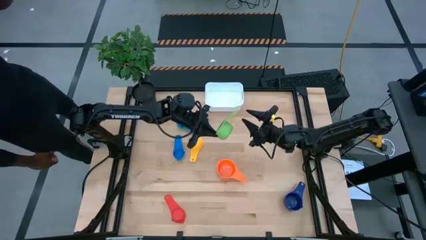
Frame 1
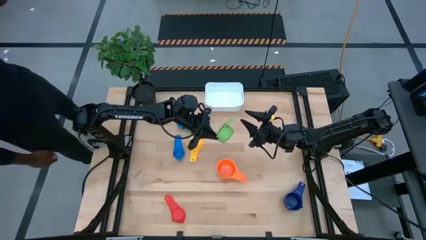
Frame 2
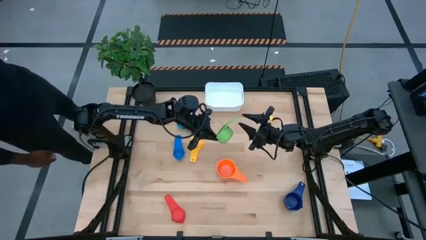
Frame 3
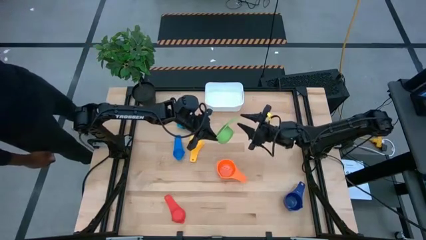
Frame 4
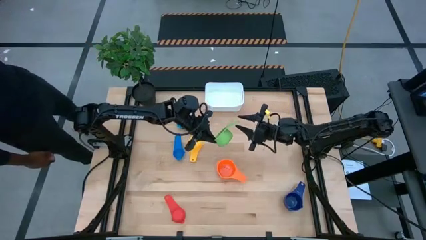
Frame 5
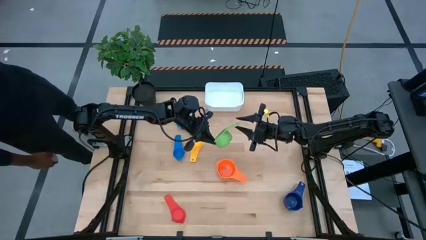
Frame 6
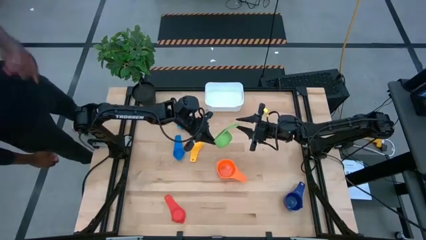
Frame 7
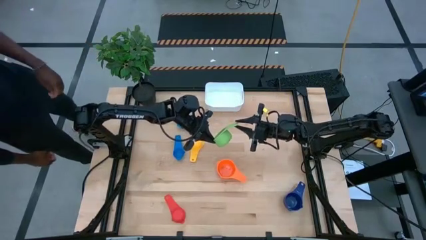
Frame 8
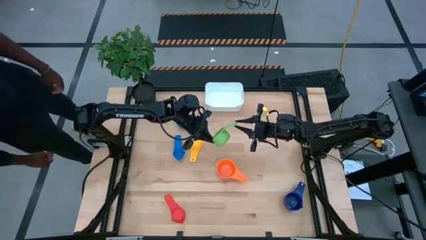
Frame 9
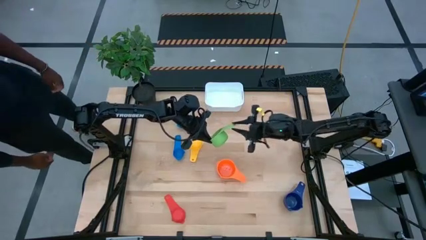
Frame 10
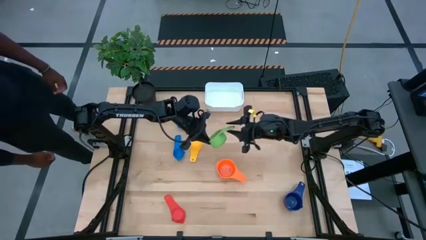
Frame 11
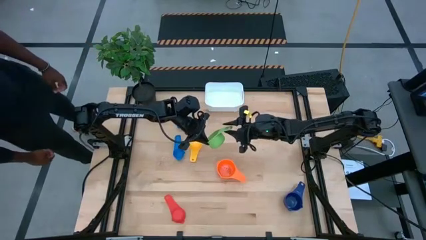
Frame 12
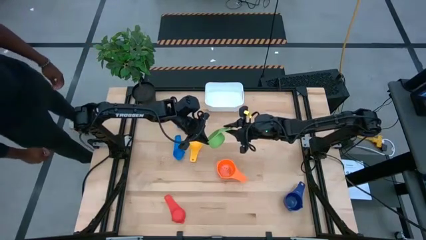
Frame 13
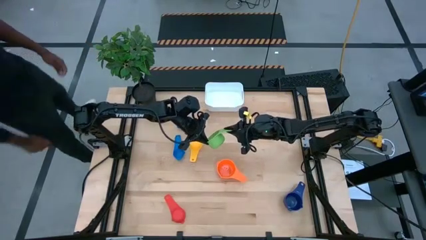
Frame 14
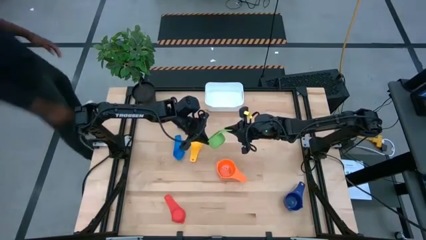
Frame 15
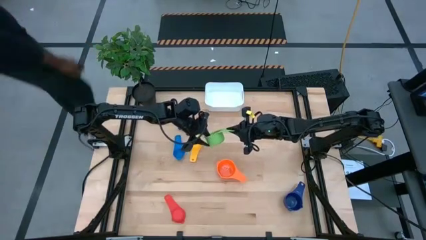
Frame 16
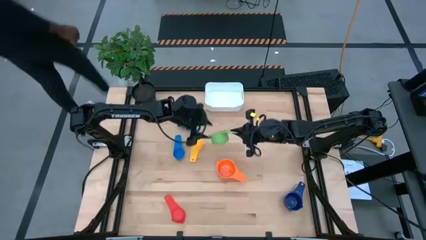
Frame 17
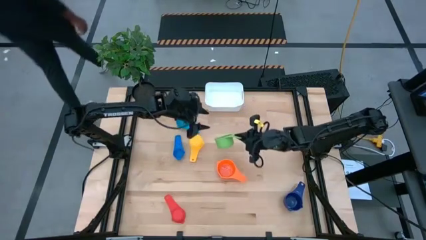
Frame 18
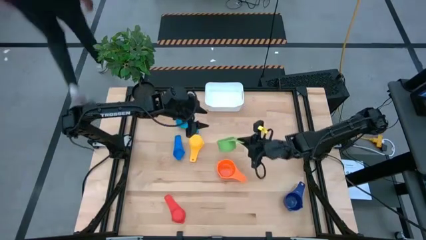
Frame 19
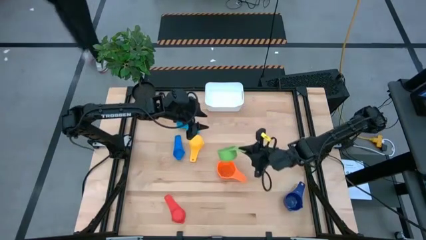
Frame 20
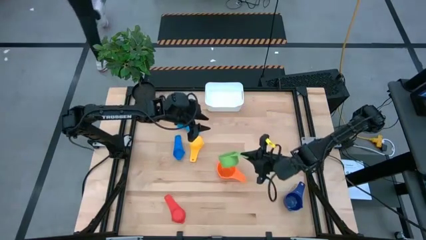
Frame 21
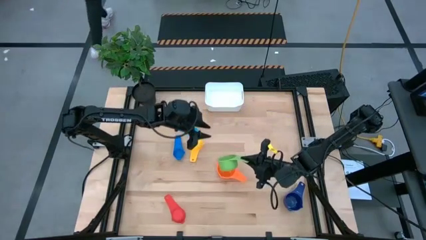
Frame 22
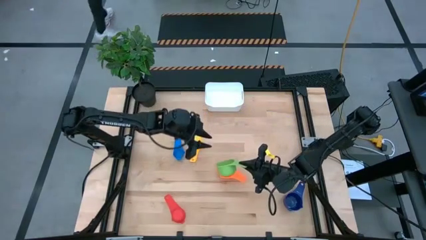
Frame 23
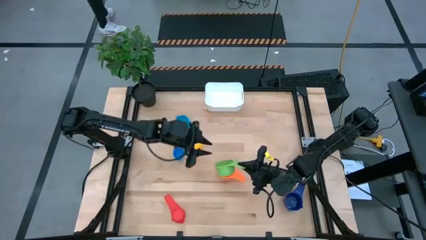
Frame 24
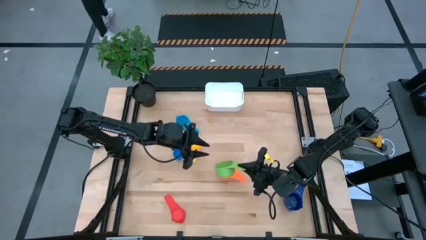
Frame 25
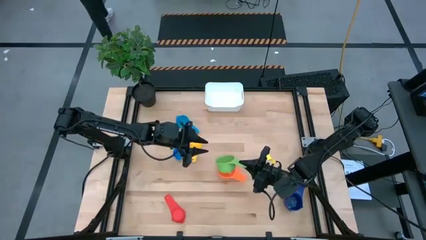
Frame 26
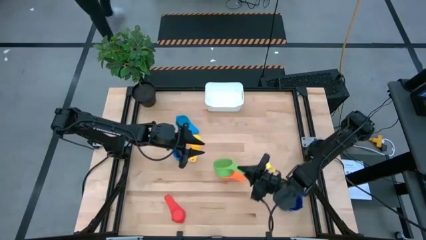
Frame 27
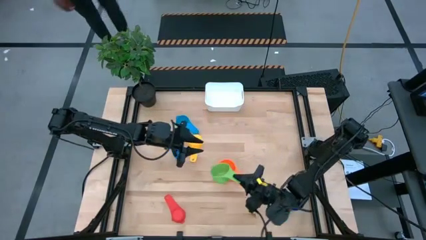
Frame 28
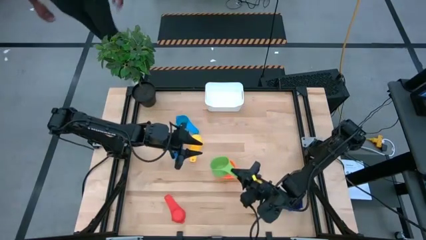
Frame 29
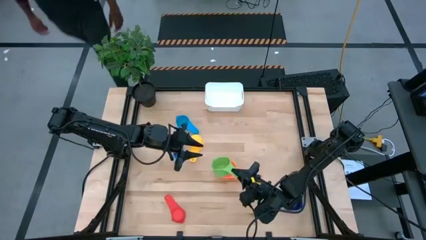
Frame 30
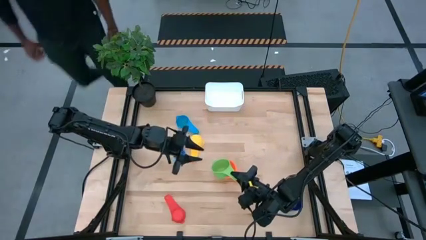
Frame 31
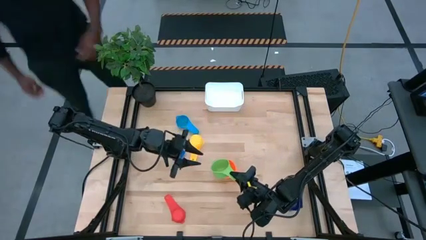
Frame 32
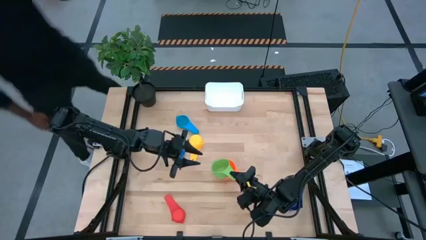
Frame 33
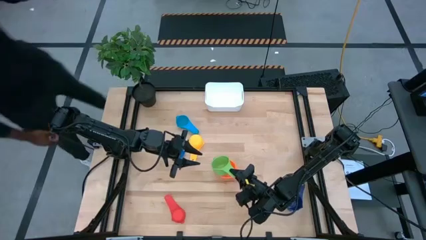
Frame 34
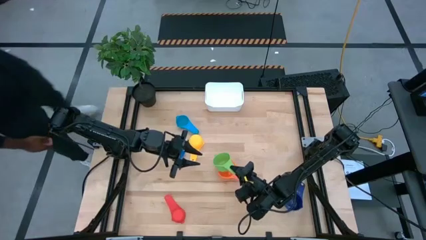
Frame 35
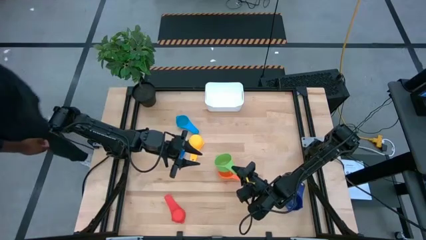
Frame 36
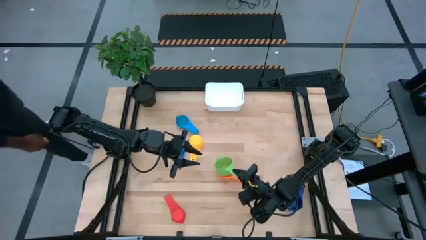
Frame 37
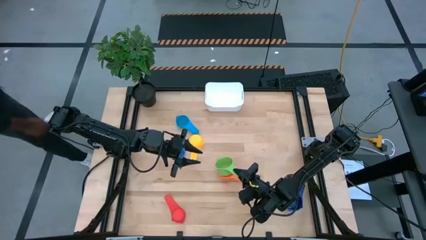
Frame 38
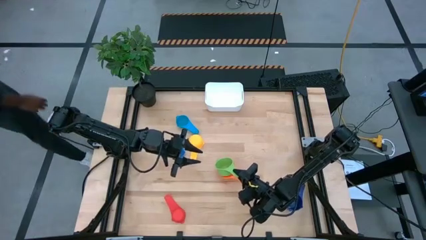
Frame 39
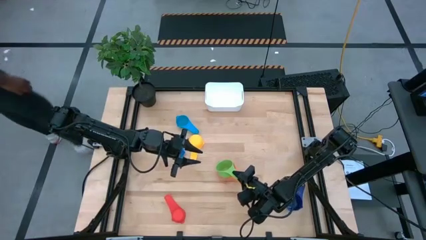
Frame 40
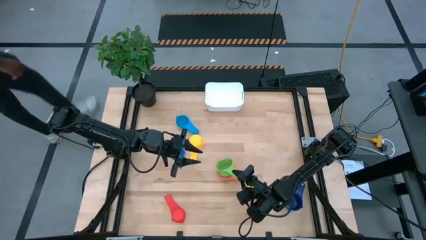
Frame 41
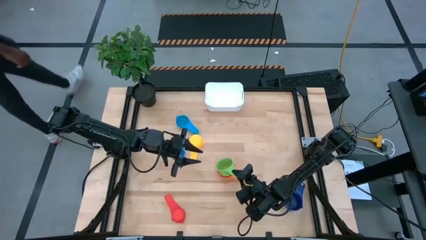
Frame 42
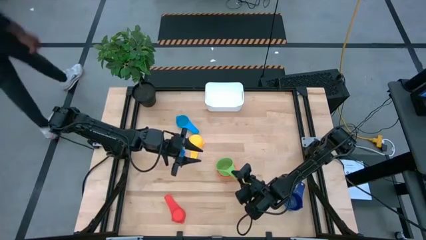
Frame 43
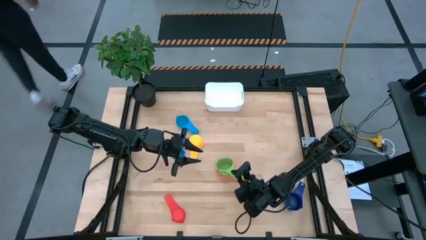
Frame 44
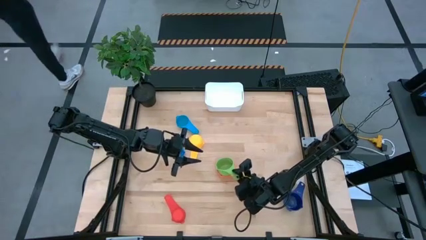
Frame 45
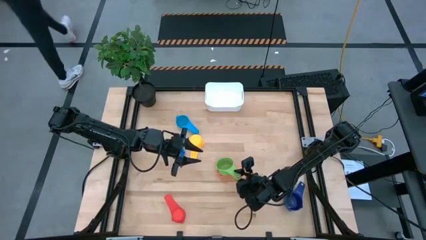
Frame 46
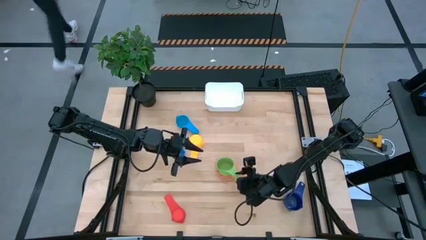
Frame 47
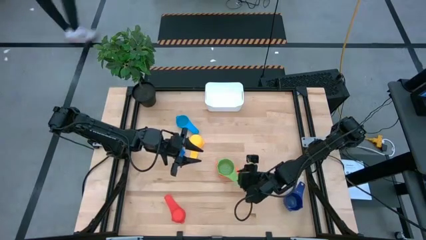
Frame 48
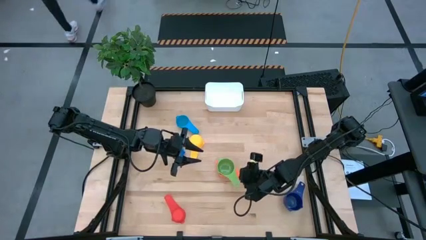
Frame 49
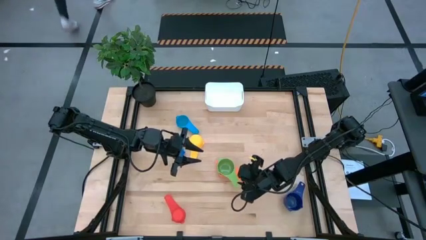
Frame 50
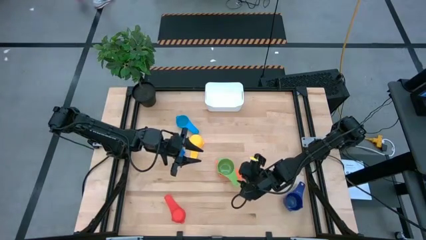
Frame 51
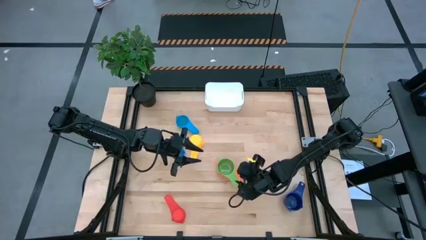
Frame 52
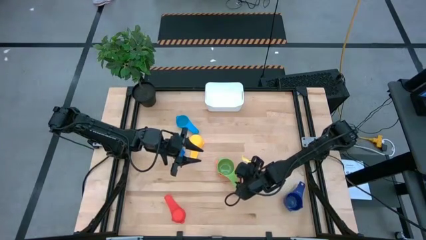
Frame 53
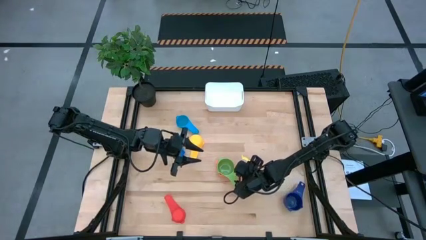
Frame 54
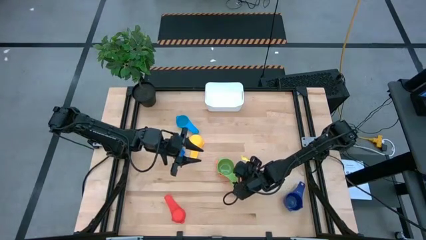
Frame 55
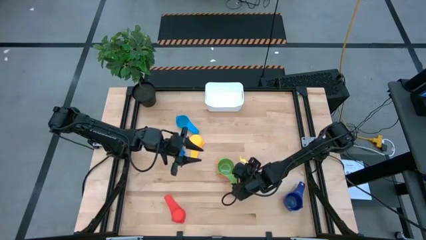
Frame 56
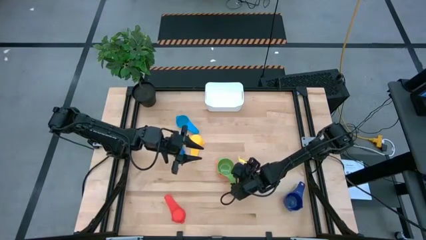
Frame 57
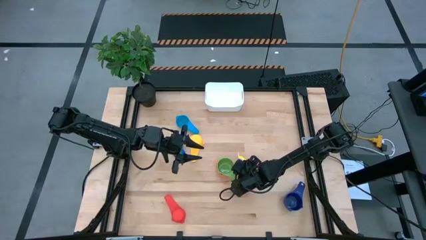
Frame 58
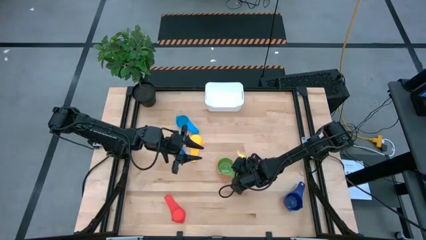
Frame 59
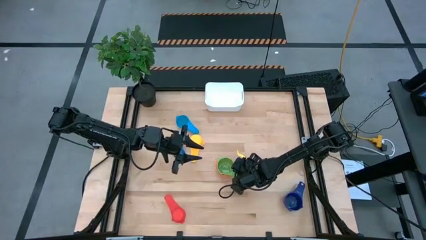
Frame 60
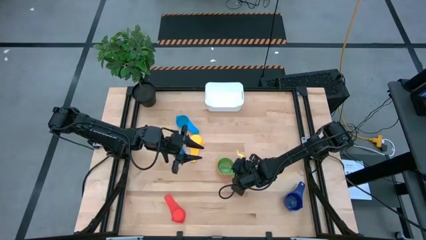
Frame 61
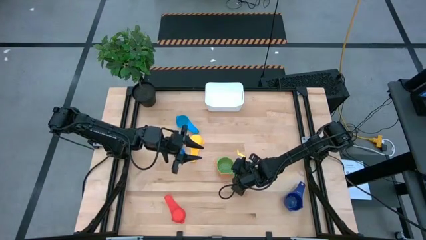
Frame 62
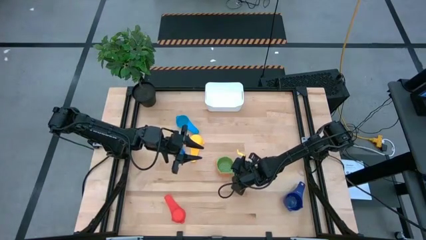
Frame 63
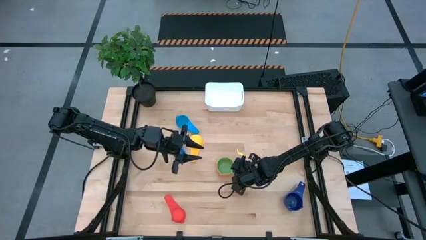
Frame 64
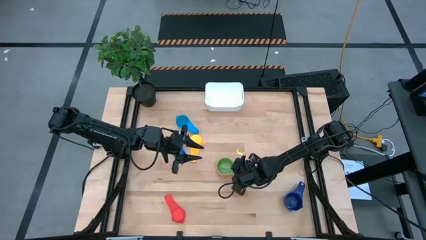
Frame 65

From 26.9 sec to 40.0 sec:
Task: Nest measuring cups in basket
Stack the green measuring cup on top of the orange measuring cup

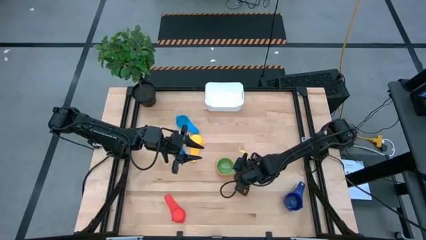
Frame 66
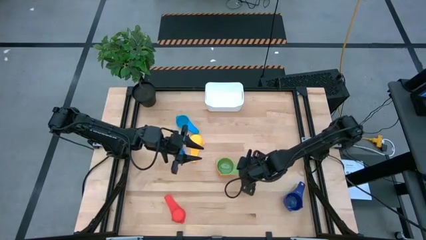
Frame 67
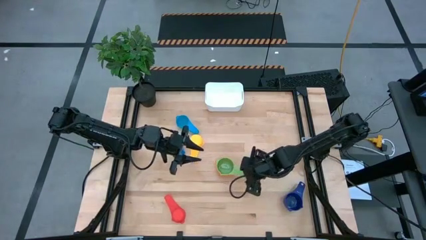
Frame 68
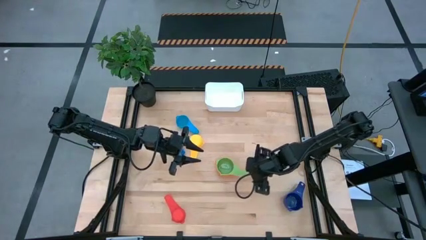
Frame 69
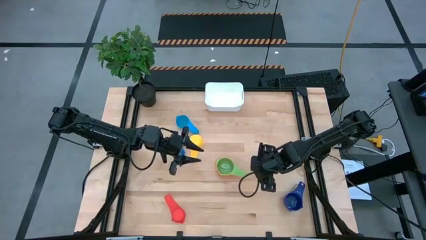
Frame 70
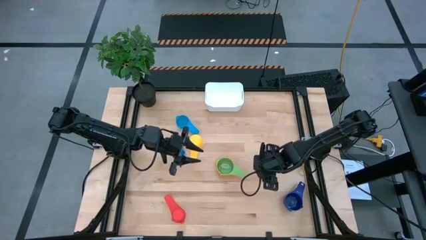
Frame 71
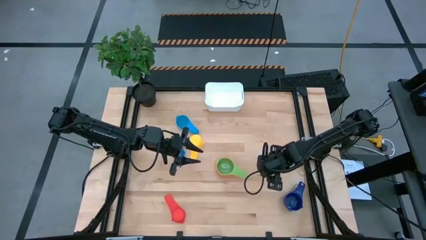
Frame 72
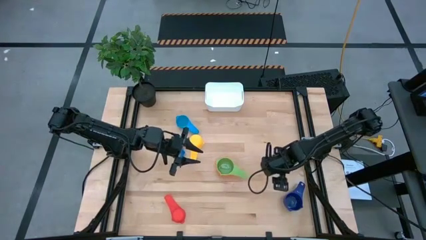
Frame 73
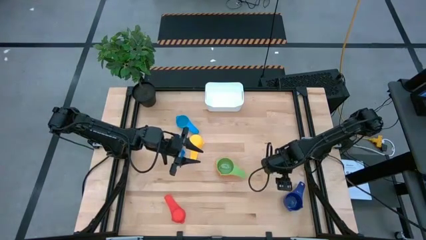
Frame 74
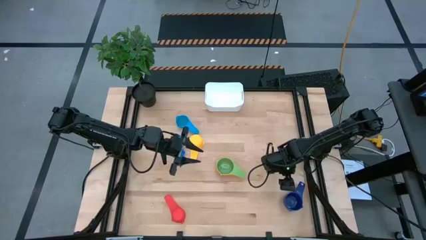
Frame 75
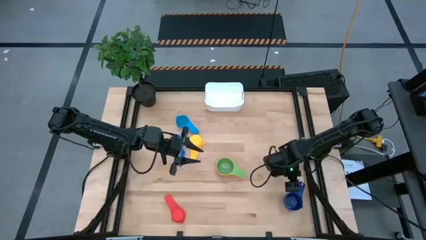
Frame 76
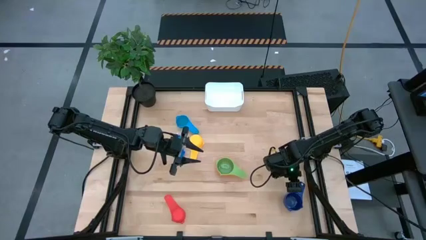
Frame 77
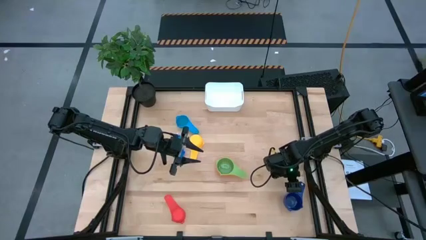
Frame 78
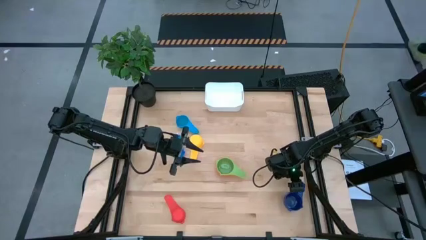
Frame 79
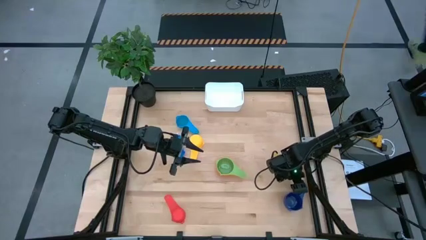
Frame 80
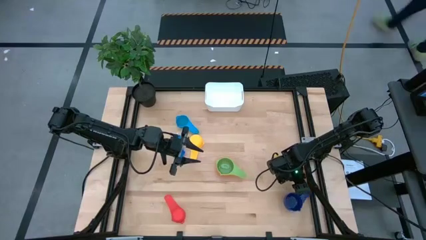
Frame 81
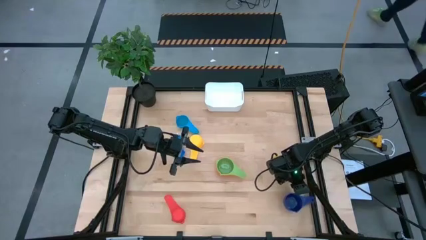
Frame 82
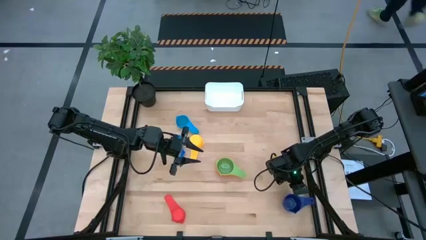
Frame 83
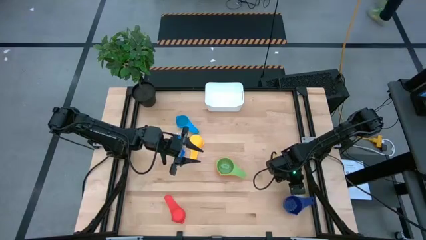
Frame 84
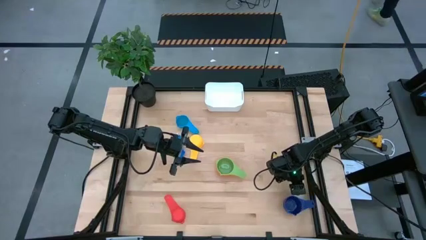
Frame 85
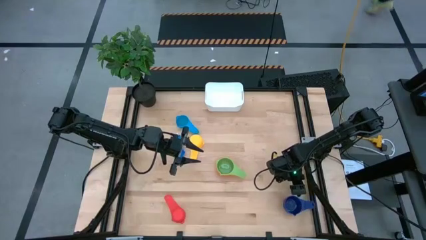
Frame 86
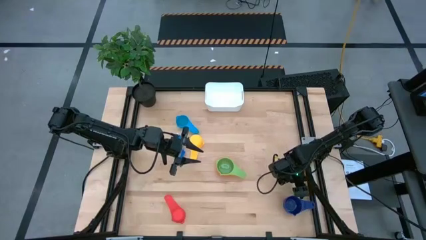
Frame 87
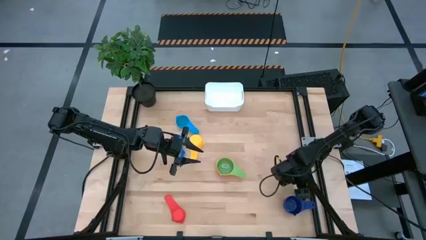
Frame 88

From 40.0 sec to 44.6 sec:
Stack the dark blue measuring cup on top of the green measuring cup
